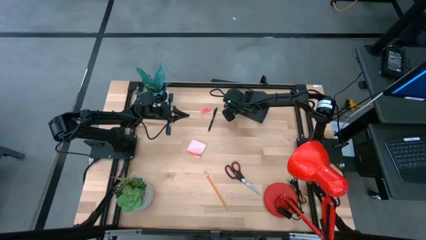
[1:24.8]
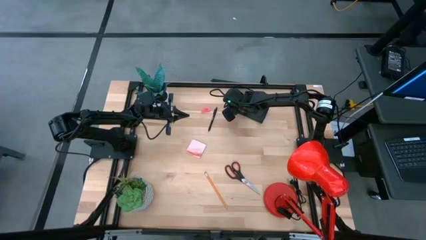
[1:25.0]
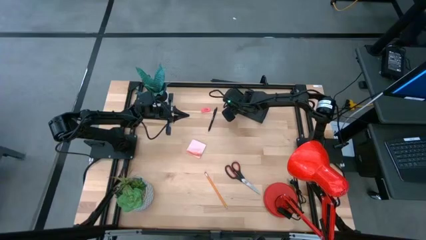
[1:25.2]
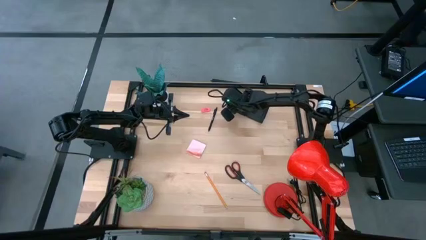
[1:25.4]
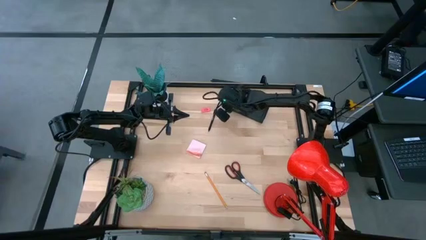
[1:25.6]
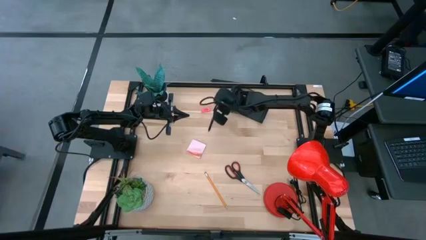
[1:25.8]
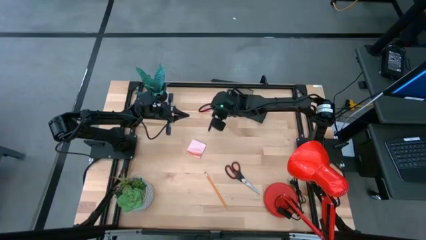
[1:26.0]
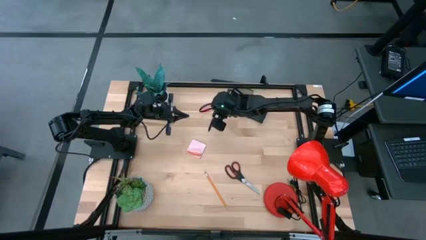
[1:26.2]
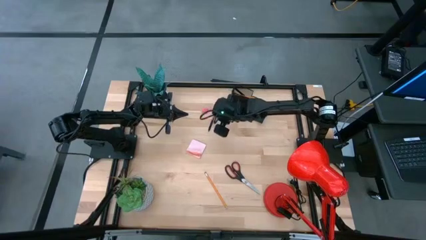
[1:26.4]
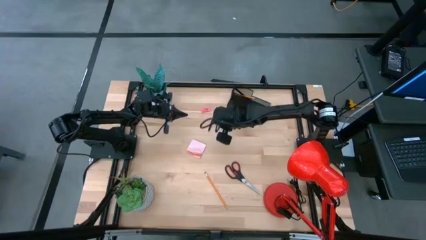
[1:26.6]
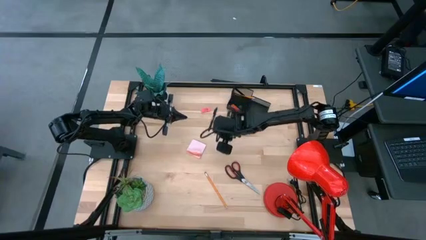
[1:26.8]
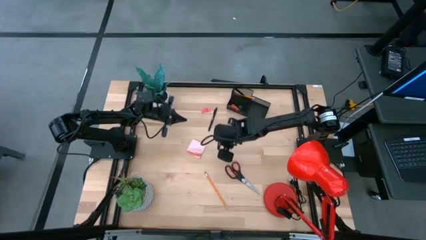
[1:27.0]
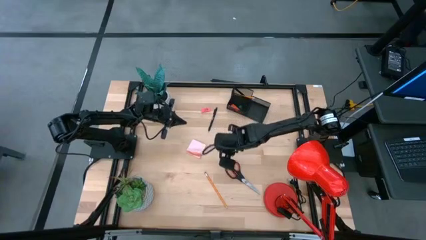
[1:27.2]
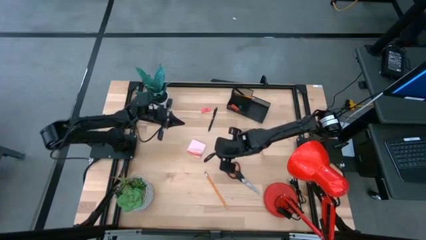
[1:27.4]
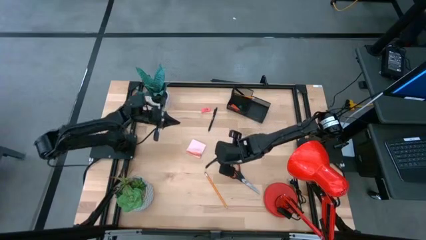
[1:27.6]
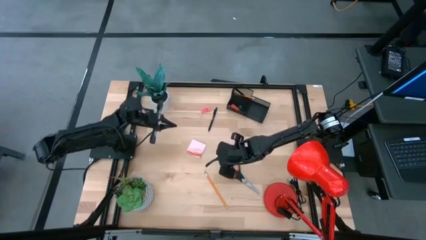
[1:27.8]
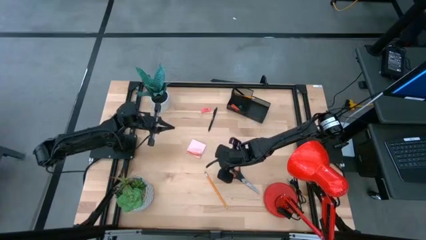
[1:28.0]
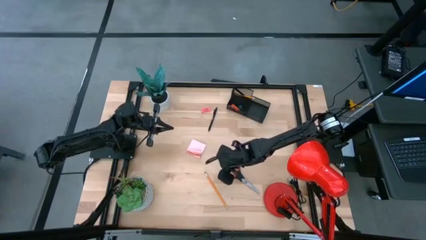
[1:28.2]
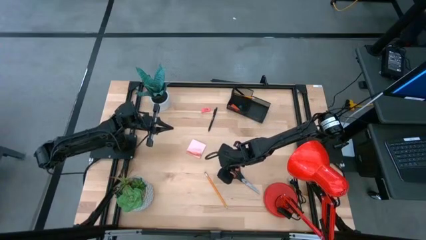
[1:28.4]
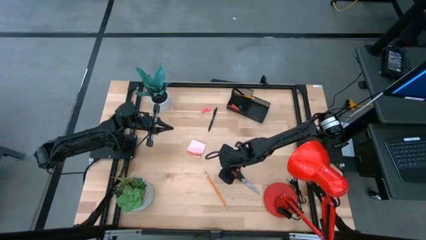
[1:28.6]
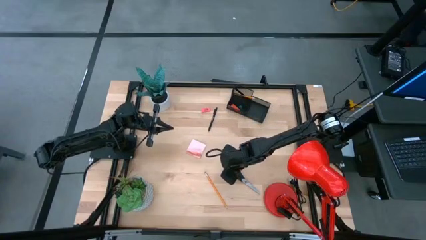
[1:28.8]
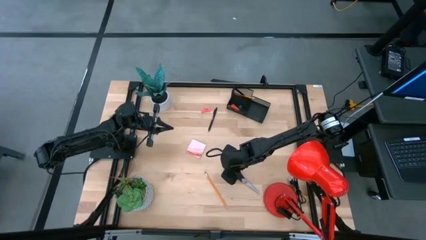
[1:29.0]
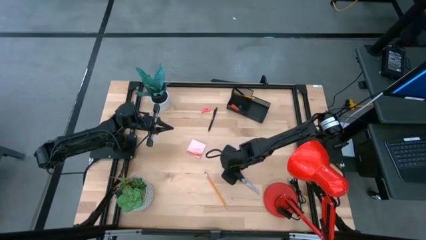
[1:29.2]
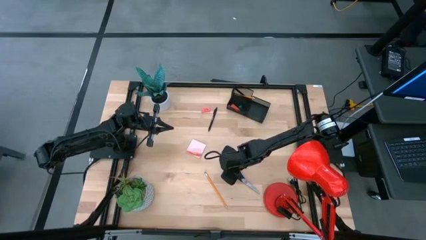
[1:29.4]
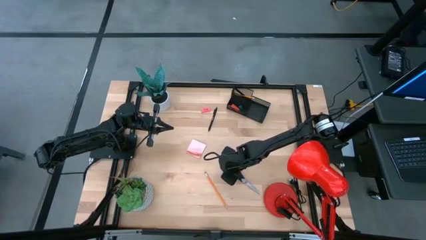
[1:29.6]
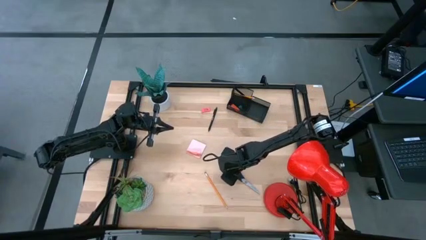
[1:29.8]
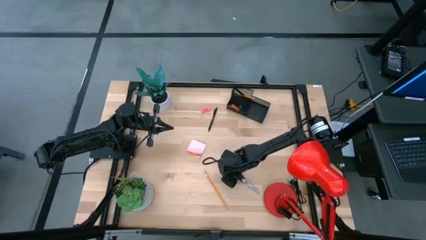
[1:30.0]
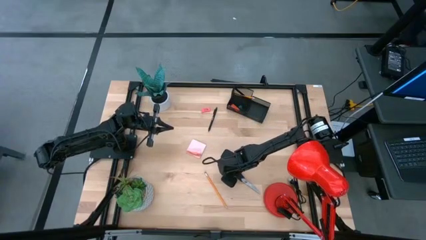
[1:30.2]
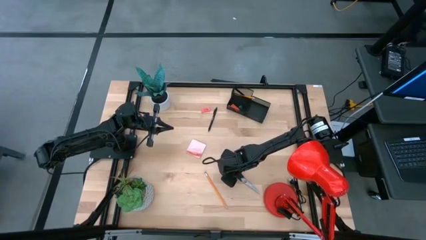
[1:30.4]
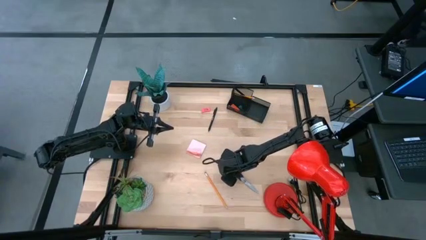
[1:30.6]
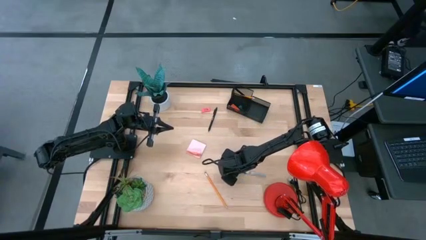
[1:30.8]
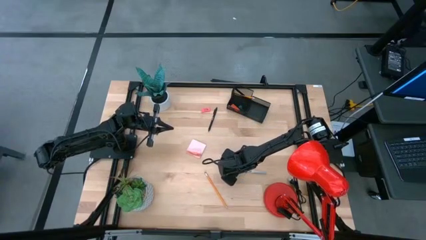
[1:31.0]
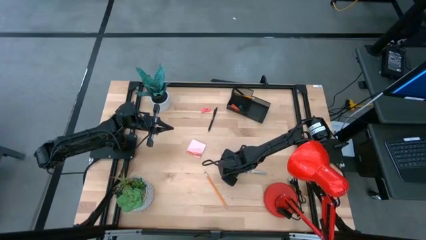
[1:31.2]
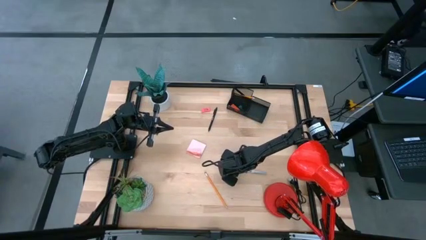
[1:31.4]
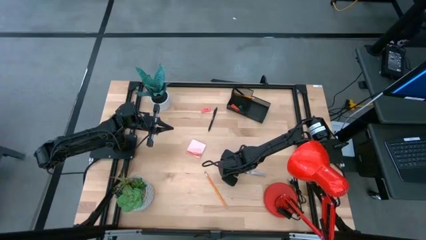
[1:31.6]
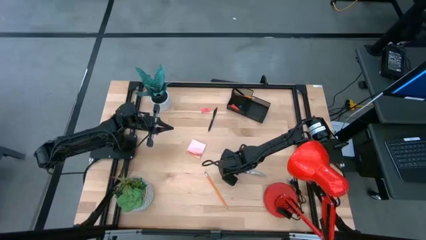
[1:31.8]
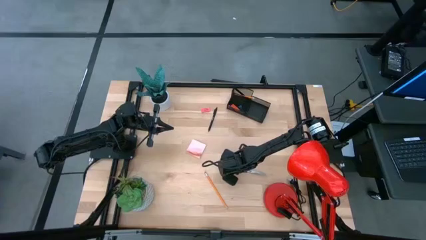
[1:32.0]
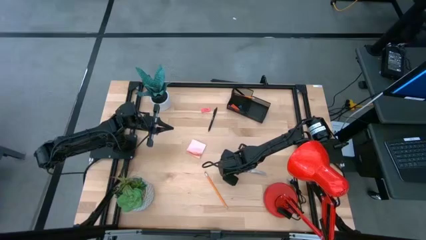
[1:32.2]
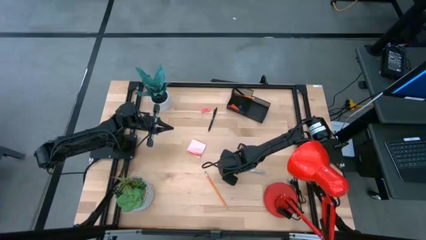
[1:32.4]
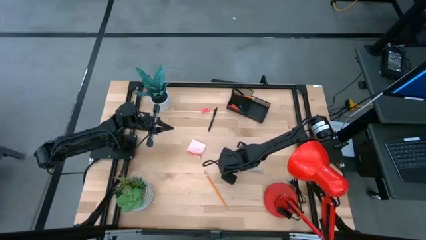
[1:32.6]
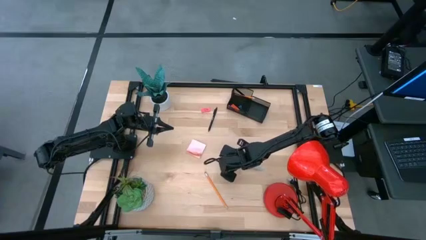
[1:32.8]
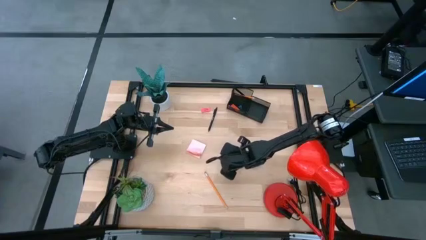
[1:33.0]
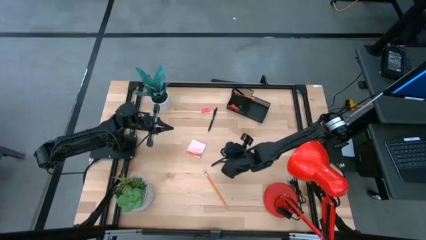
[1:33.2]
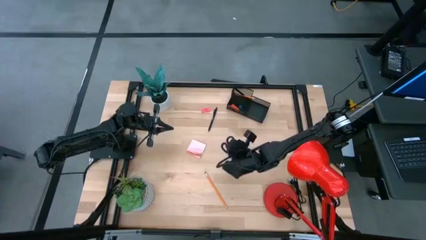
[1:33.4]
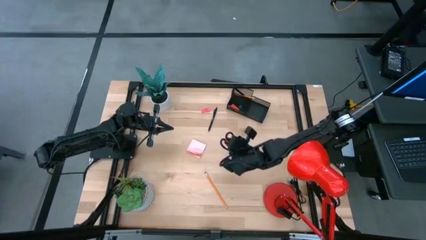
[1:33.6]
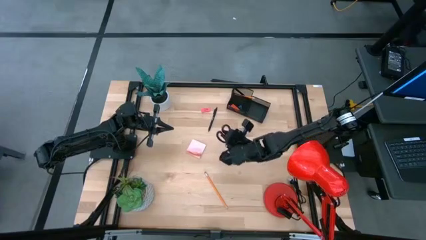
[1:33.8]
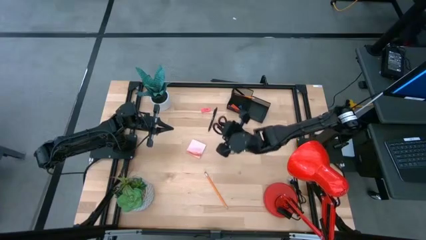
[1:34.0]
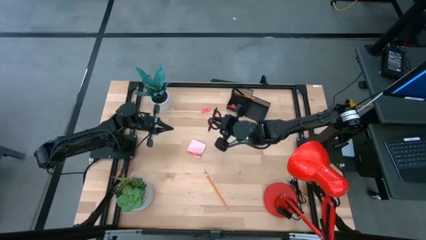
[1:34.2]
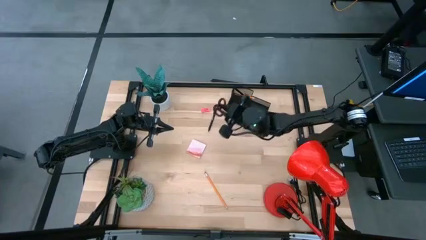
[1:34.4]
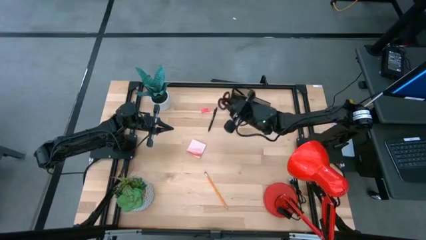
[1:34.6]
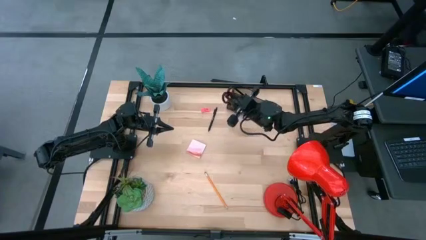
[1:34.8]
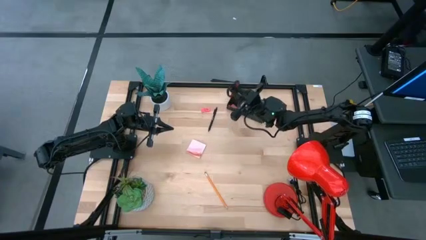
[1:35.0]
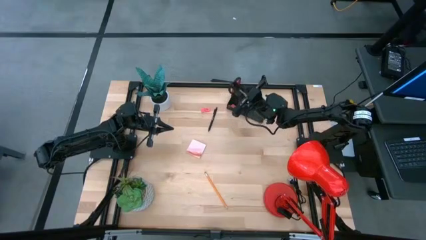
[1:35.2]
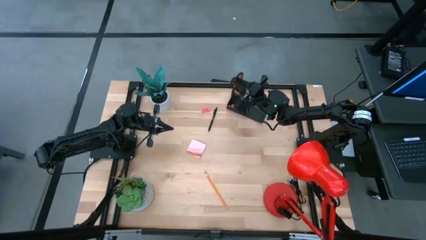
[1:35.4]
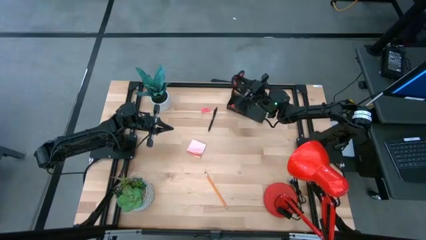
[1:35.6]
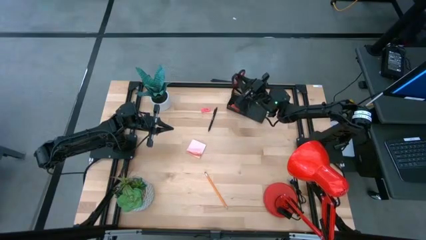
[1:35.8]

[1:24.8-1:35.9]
Task: Pick and place office supplies into organizer
Put the black scissors into the black desk organizer
